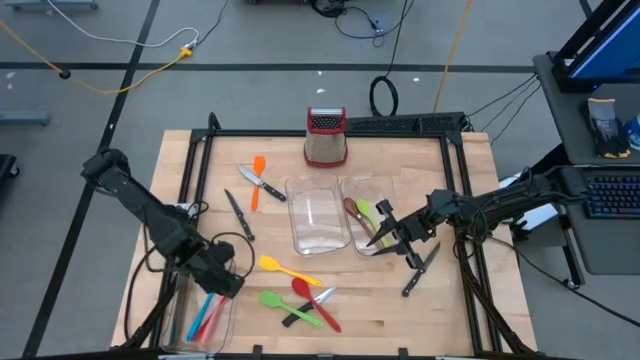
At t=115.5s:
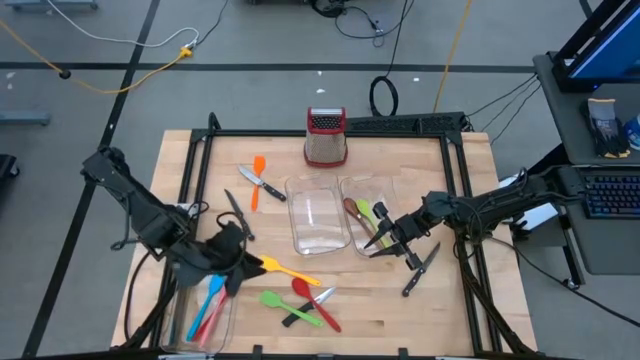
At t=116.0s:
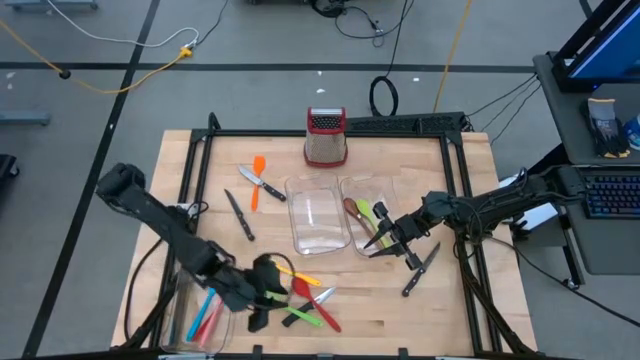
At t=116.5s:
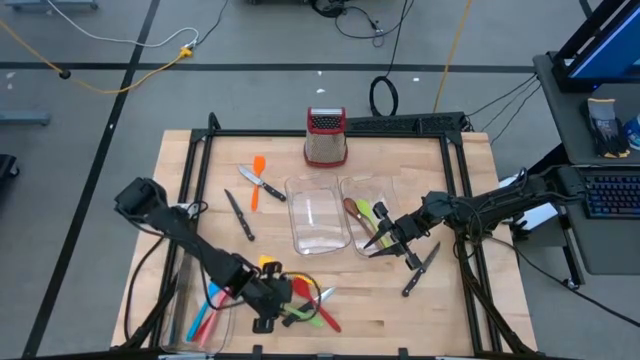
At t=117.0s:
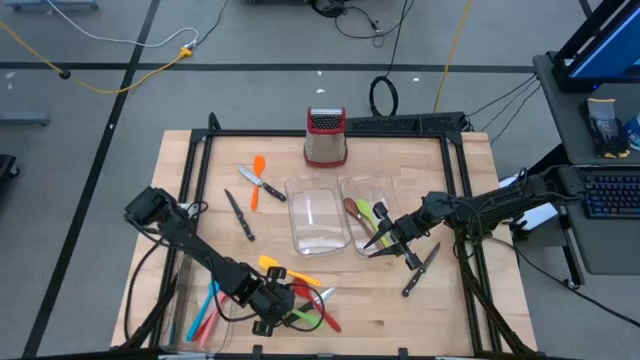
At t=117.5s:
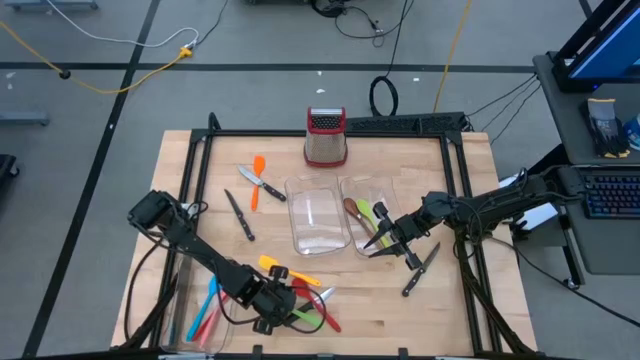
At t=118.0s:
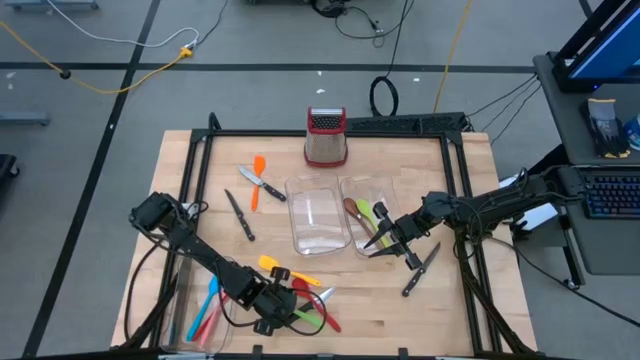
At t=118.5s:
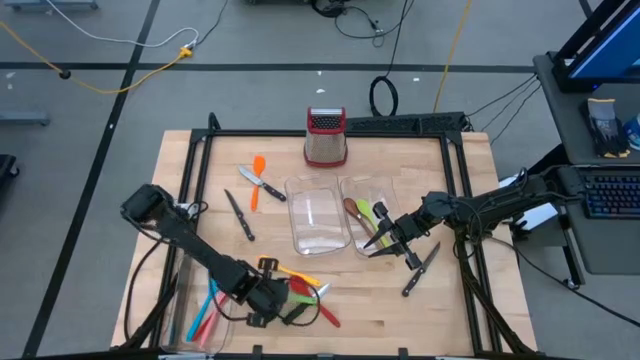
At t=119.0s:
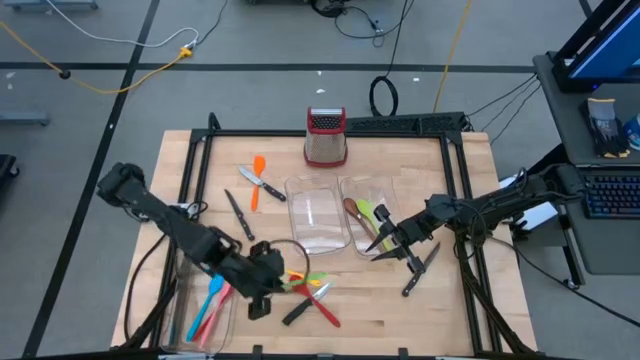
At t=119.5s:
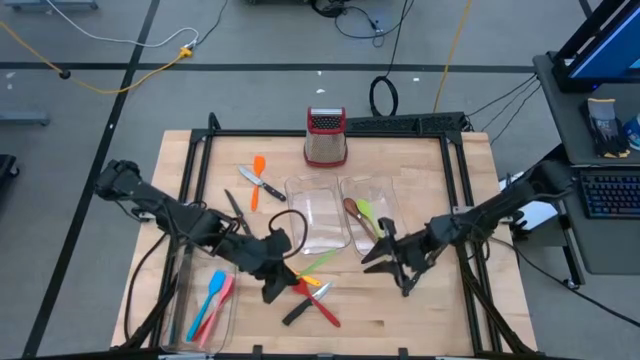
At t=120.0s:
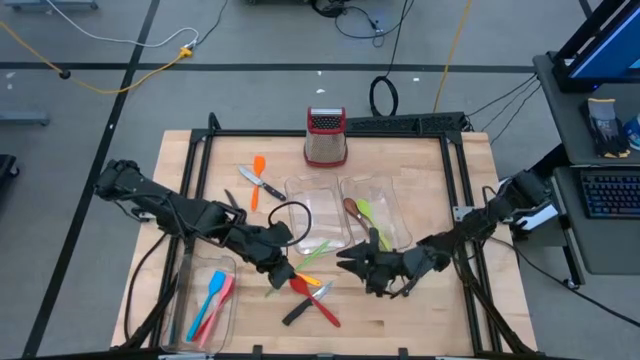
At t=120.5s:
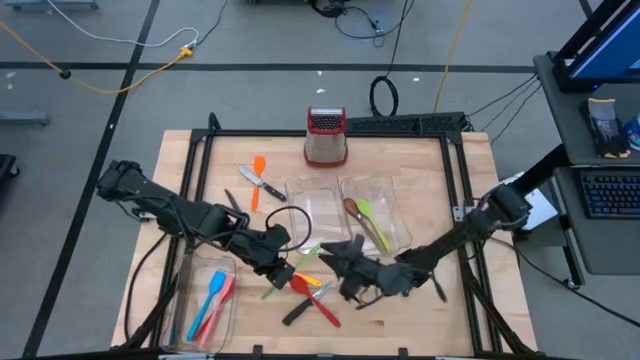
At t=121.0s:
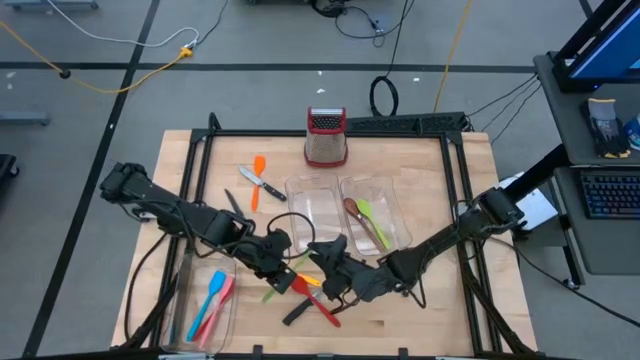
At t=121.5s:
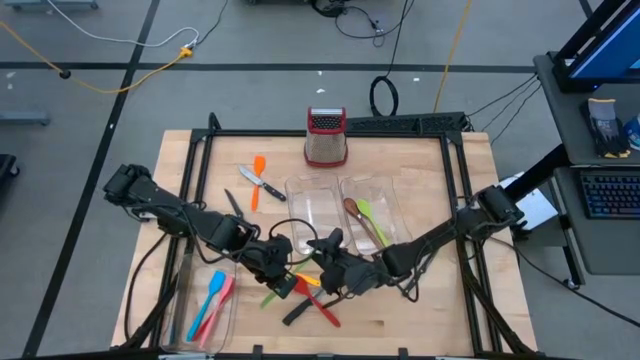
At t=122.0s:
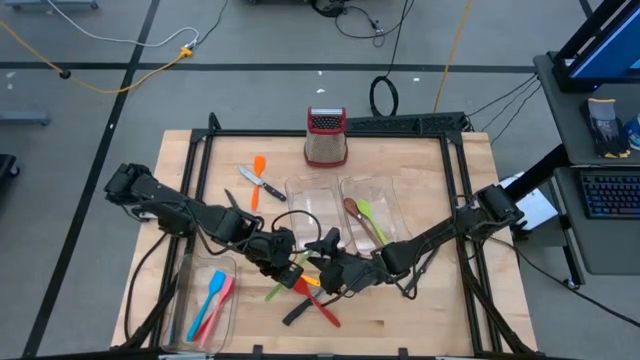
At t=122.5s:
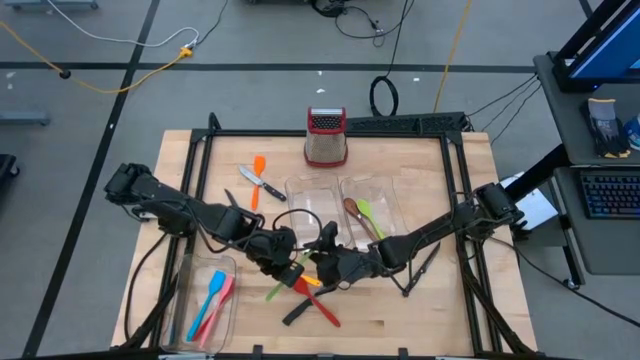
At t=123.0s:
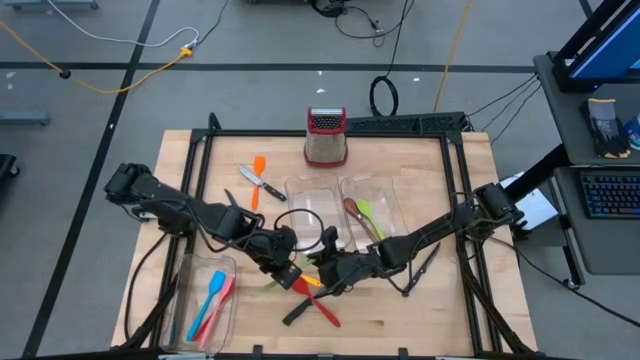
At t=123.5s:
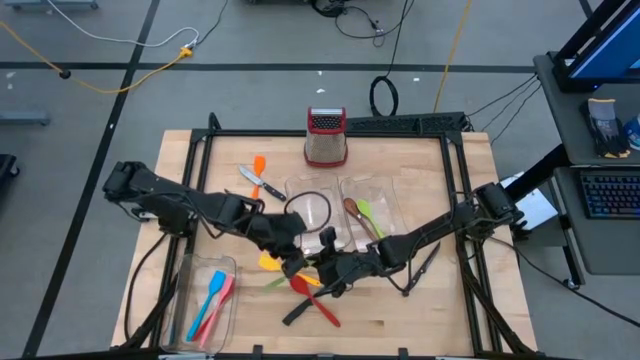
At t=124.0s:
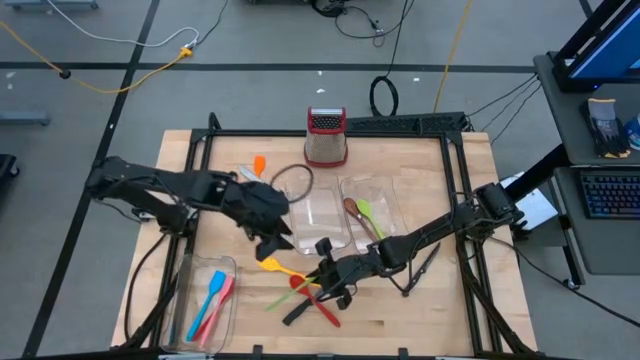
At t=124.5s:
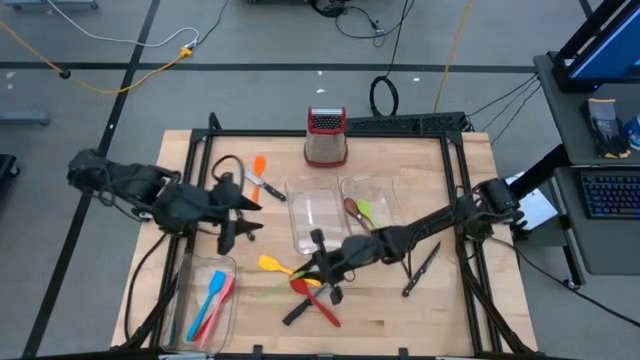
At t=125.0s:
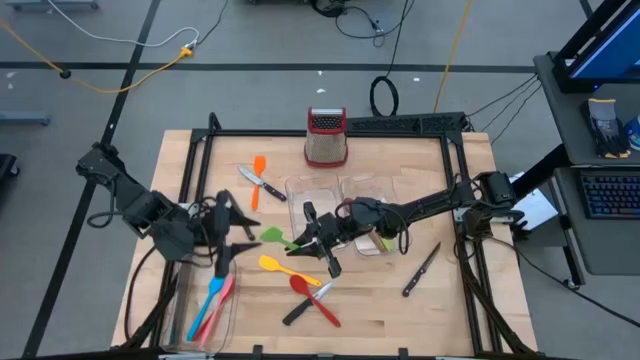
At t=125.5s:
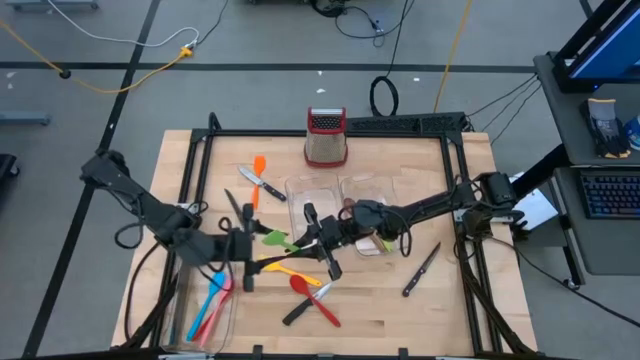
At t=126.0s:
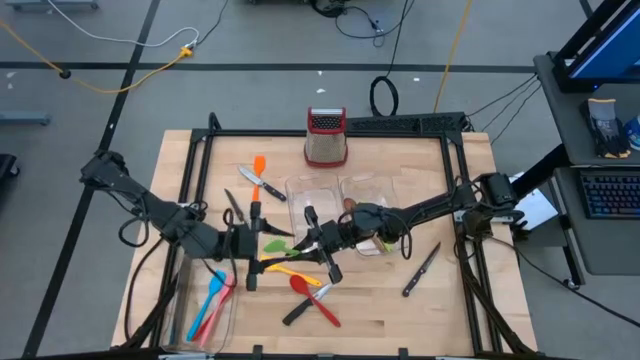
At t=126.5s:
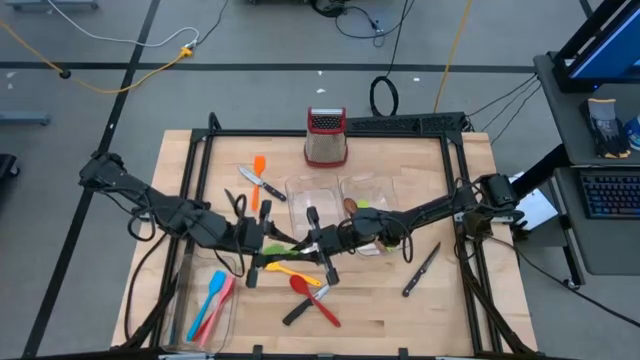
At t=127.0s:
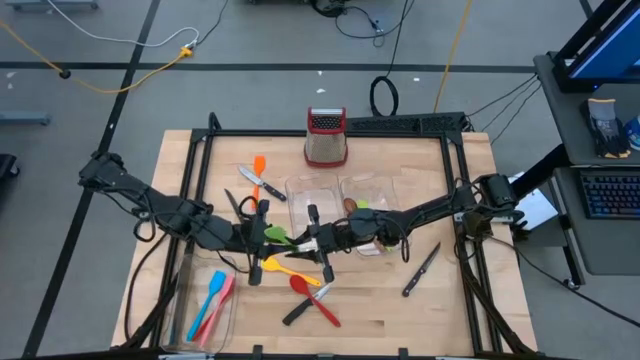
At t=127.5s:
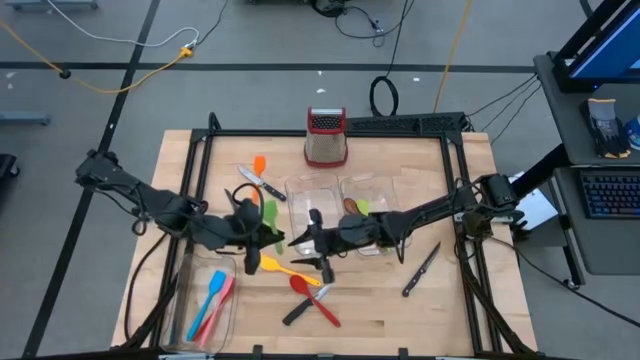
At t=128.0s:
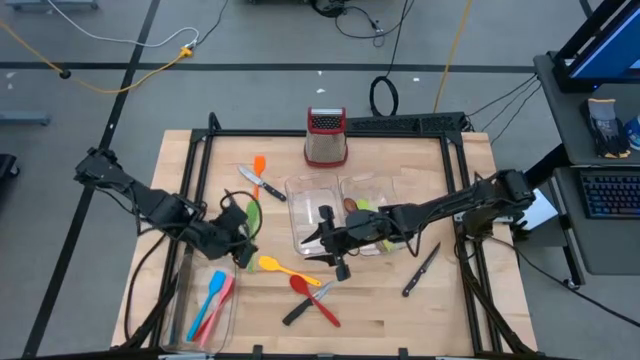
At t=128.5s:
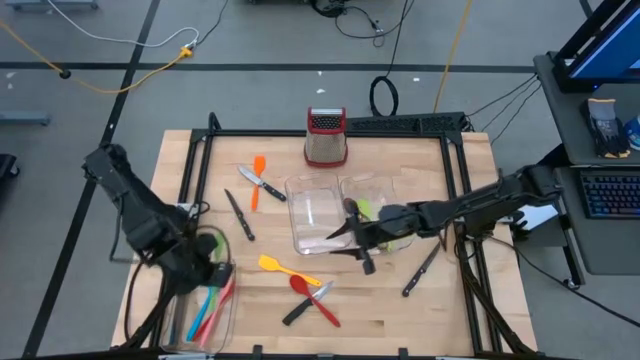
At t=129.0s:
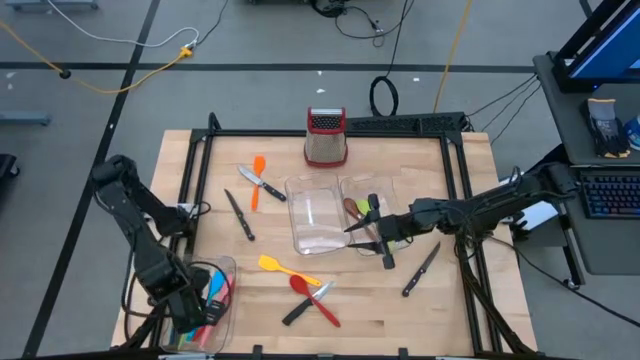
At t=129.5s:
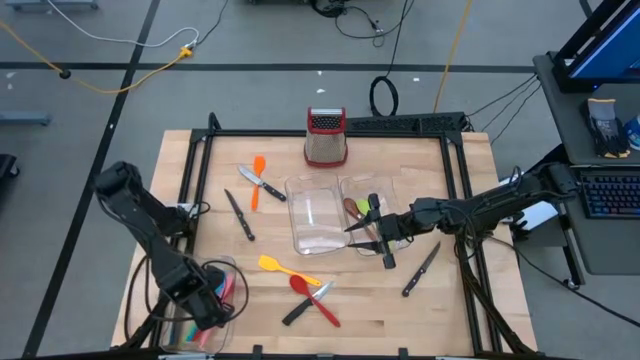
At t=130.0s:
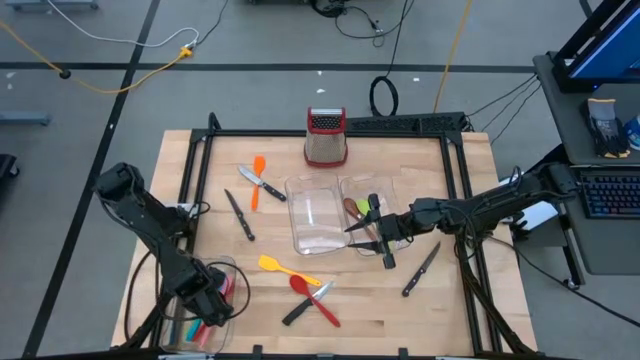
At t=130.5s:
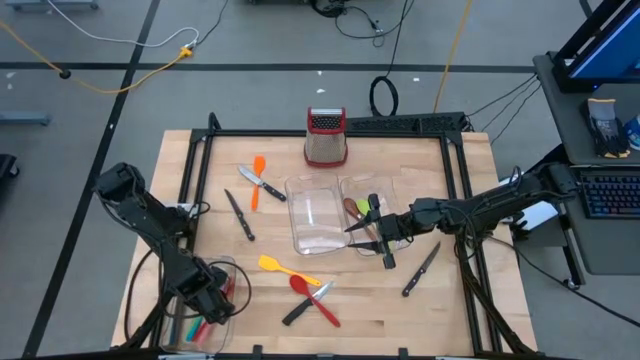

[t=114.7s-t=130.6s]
Task: Pick & Place Kitchen Items
Put the green spatula into the left transparent bin

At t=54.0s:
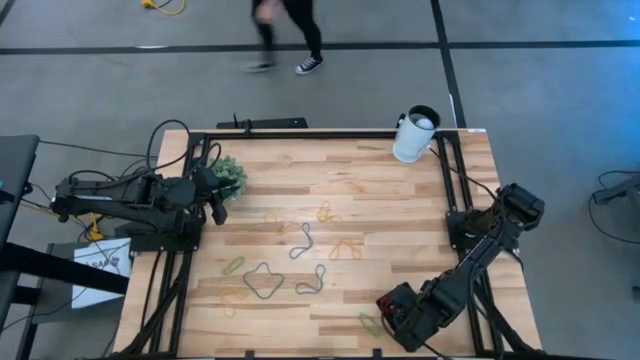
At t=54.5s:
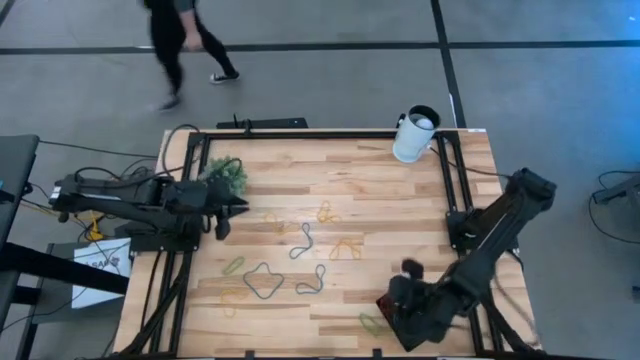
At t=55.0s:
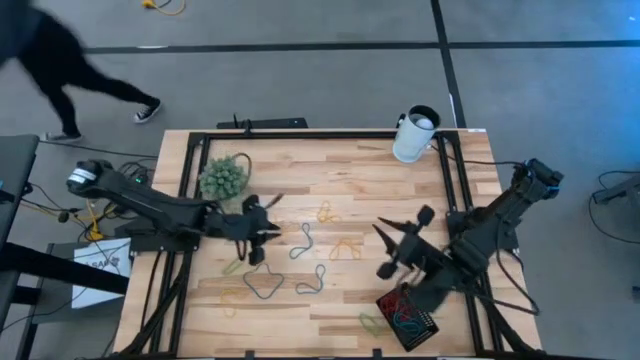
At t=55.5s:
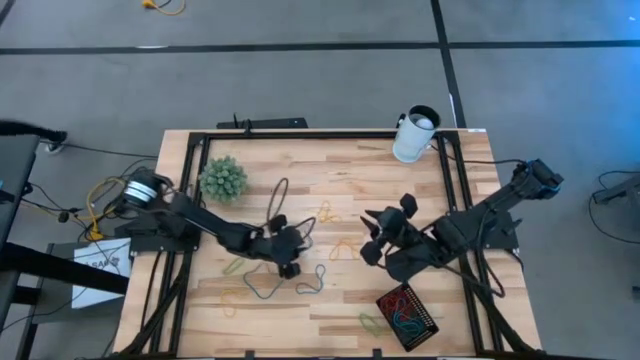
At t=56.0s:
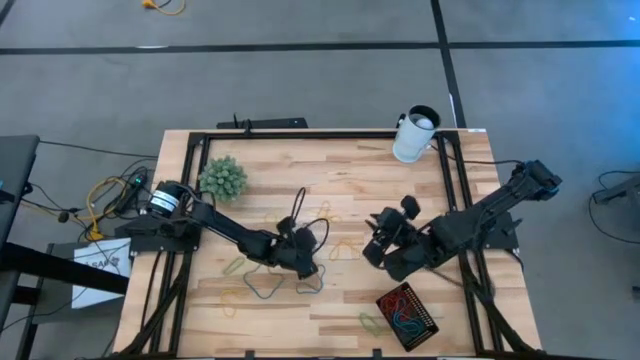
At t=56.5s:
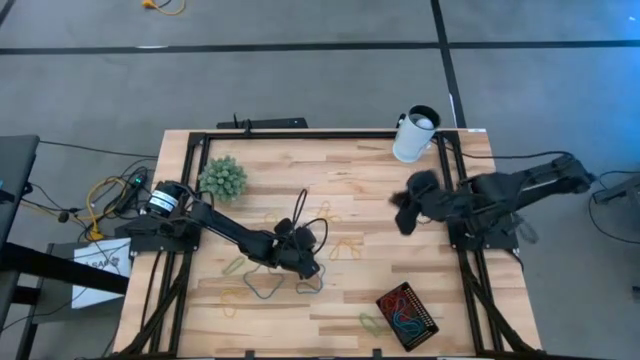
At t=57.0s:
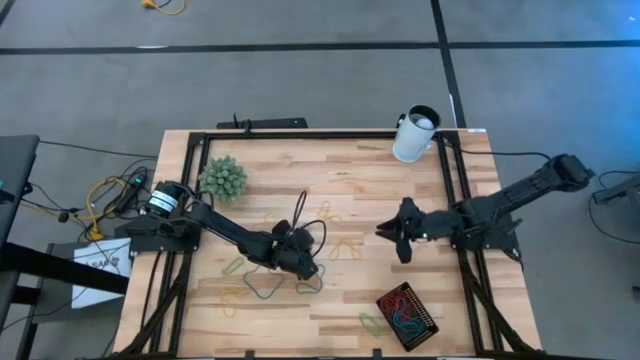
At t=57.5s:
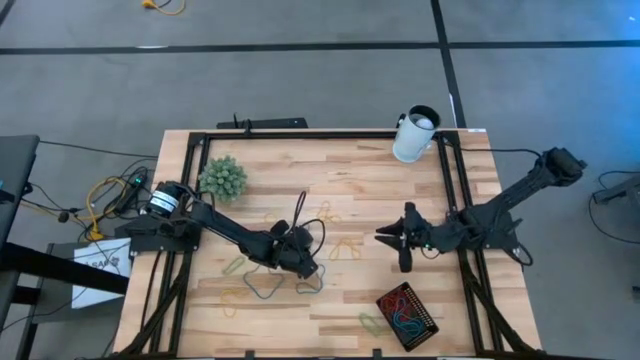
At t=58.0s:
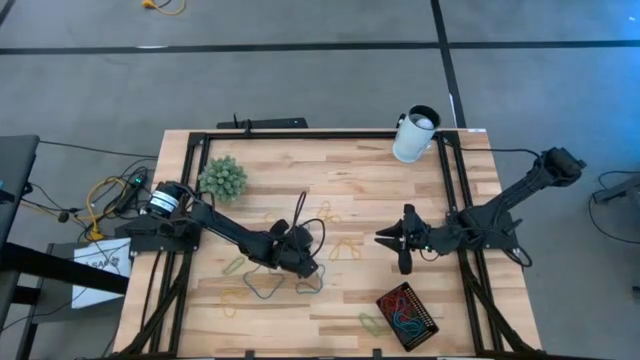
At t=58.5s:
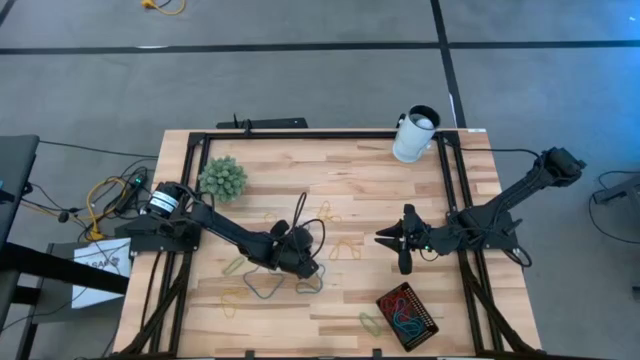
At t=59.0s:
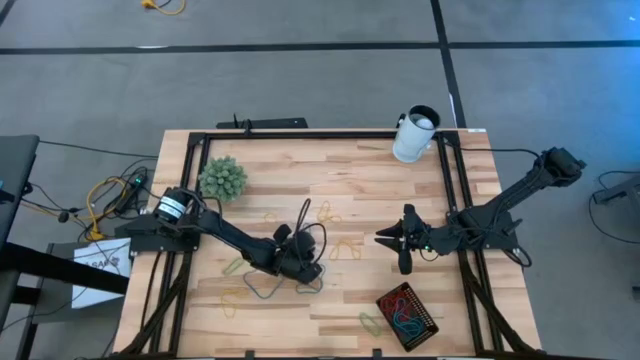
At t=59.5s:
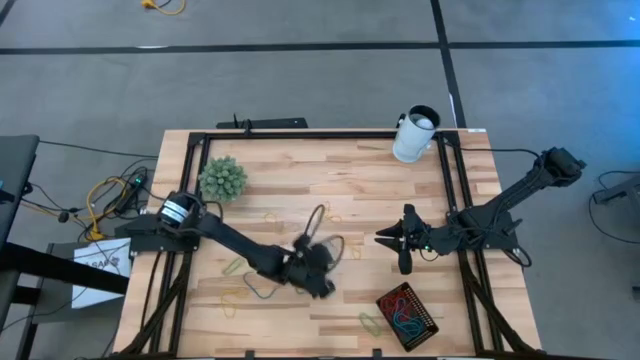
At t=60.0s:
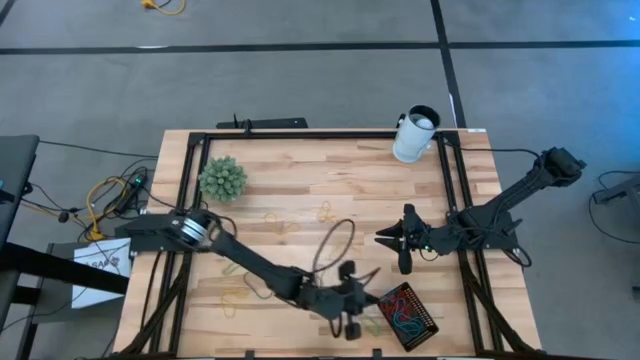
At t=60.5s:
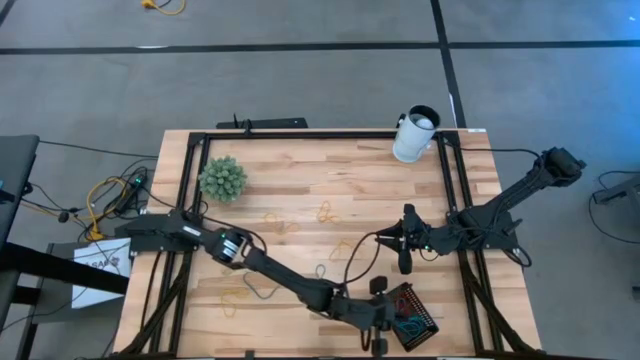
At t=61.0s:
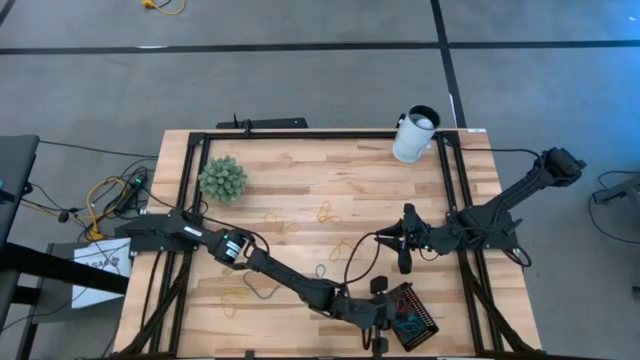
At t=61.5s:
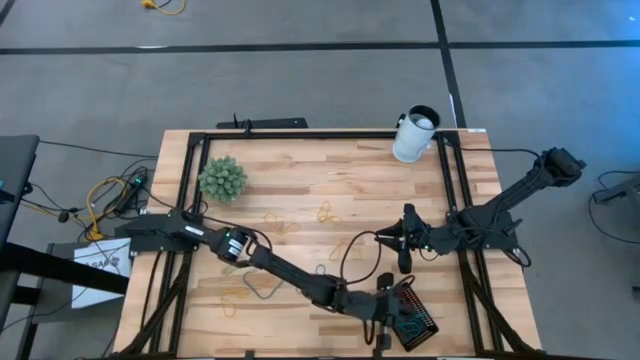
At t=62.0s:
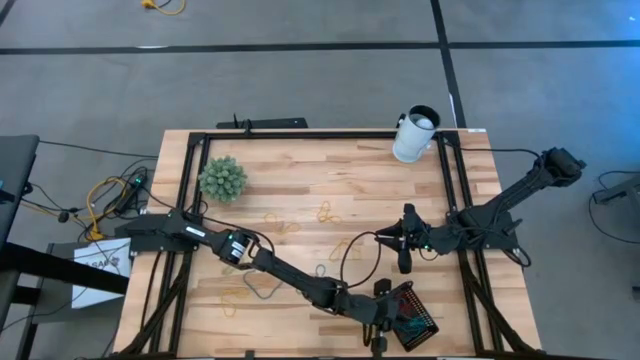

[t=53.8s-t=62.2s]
Task: Pick and place rubber bands into bin
Put the blue rubber band into the black basket
